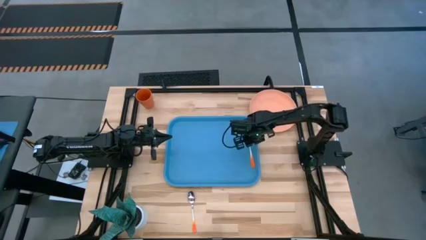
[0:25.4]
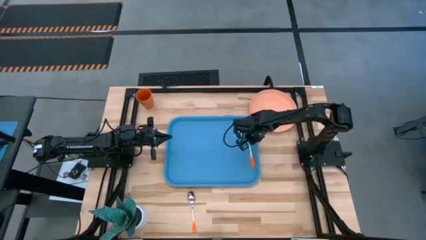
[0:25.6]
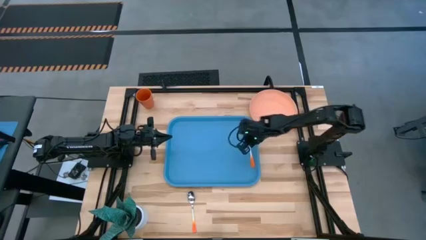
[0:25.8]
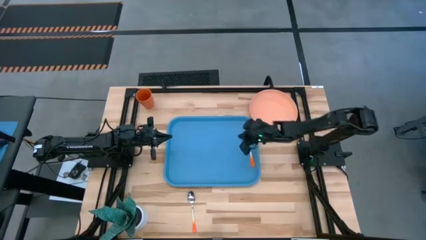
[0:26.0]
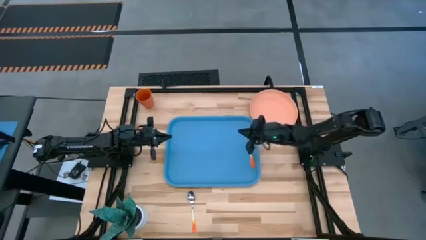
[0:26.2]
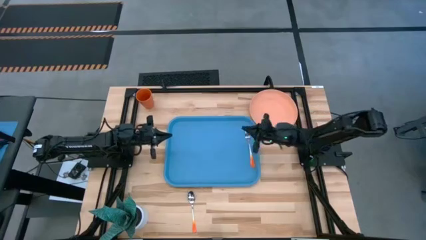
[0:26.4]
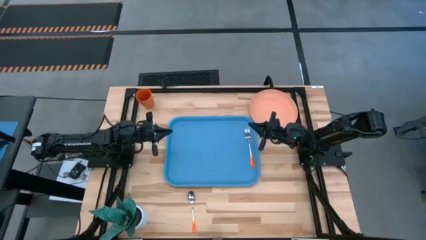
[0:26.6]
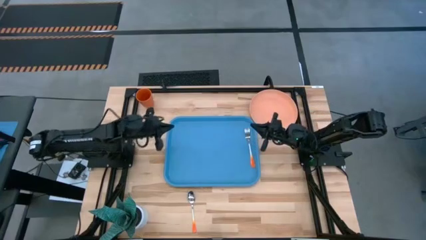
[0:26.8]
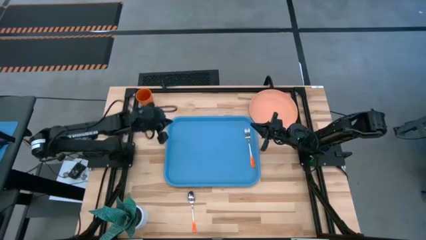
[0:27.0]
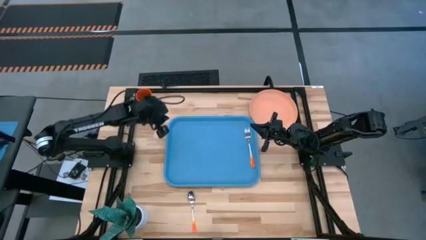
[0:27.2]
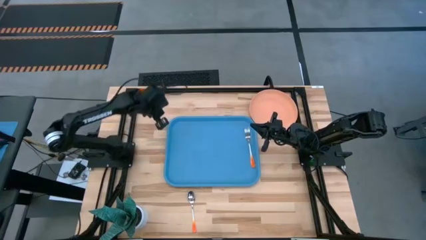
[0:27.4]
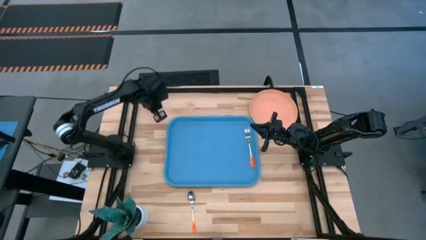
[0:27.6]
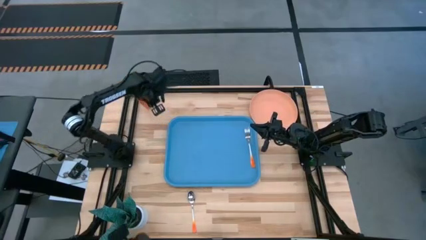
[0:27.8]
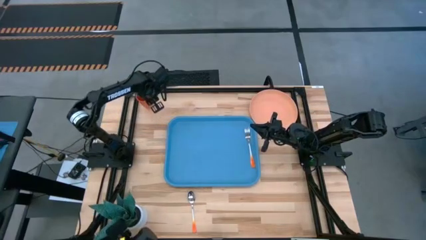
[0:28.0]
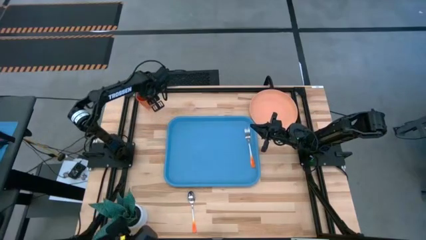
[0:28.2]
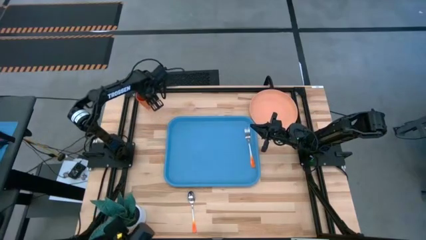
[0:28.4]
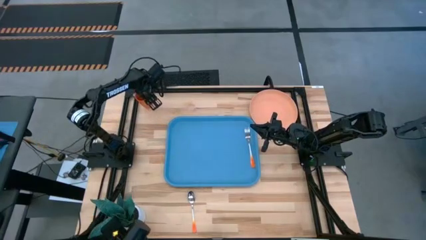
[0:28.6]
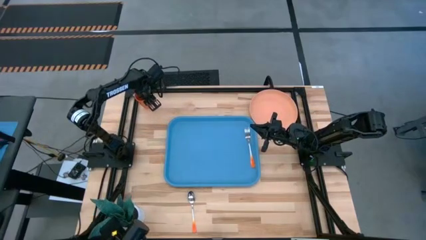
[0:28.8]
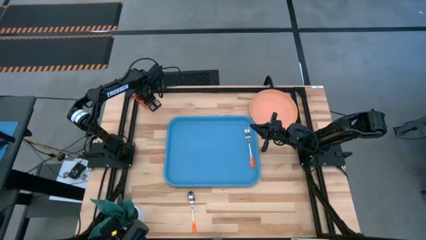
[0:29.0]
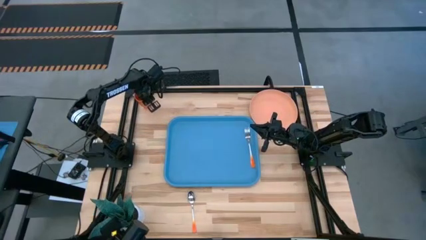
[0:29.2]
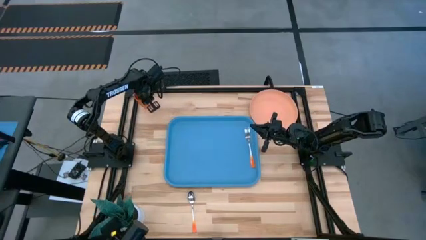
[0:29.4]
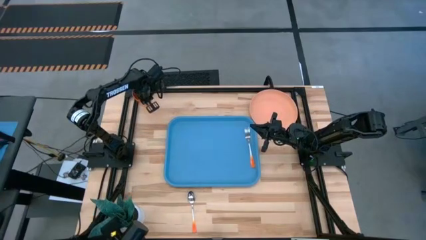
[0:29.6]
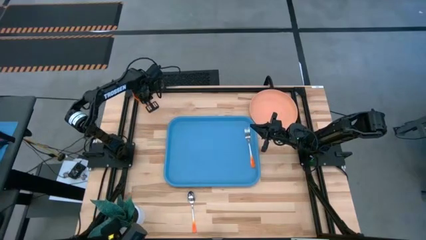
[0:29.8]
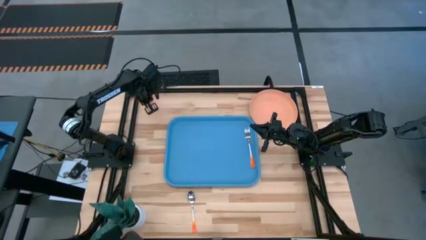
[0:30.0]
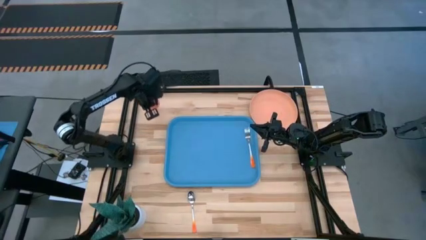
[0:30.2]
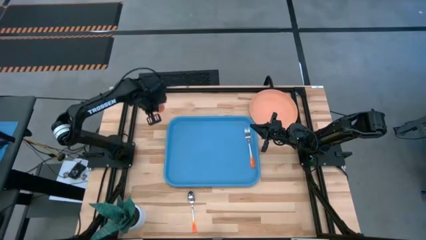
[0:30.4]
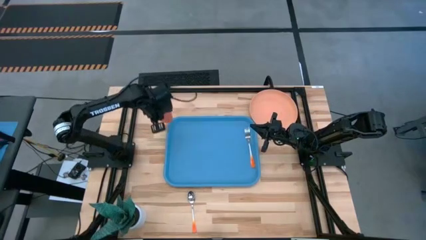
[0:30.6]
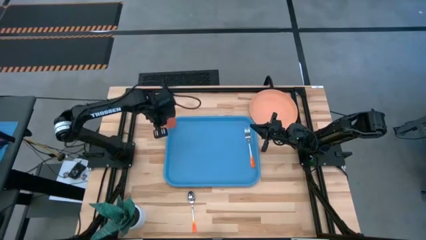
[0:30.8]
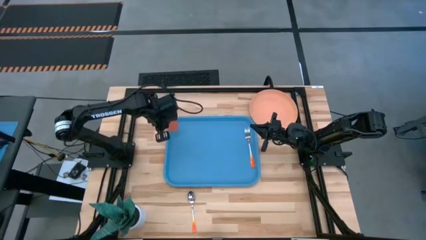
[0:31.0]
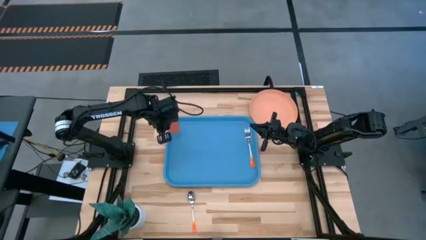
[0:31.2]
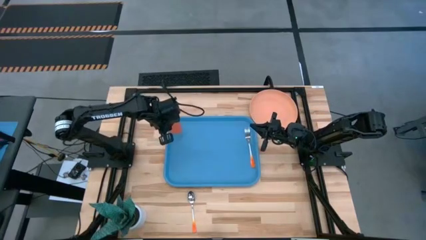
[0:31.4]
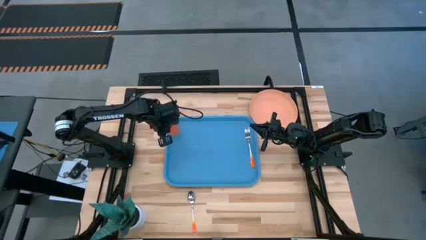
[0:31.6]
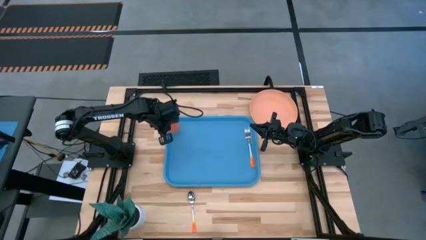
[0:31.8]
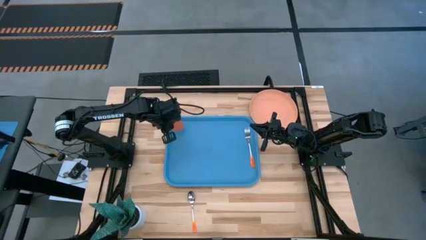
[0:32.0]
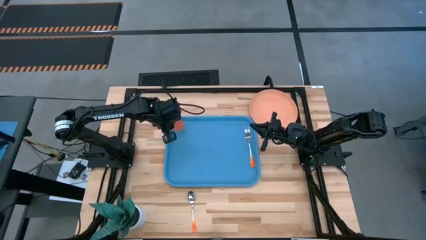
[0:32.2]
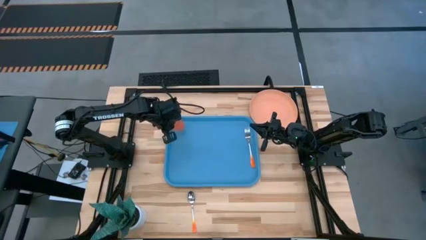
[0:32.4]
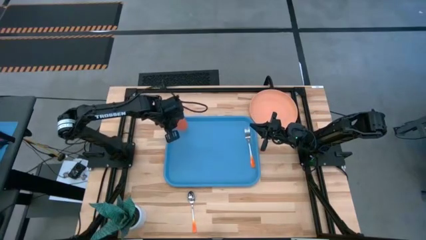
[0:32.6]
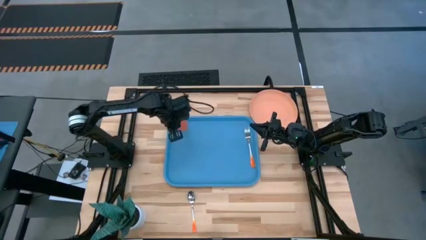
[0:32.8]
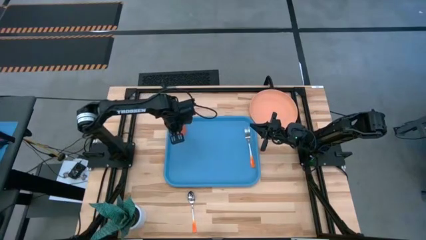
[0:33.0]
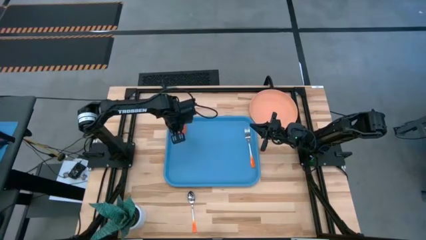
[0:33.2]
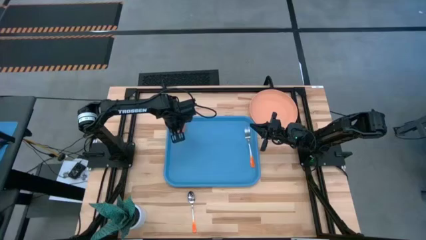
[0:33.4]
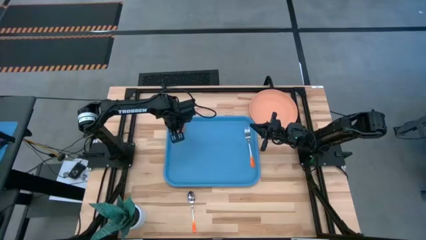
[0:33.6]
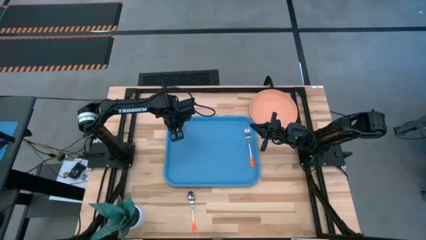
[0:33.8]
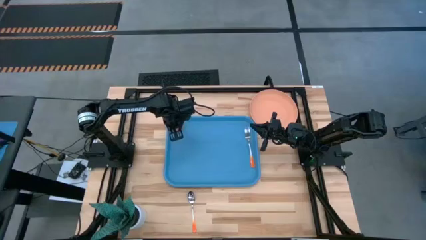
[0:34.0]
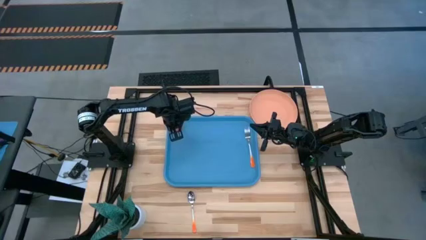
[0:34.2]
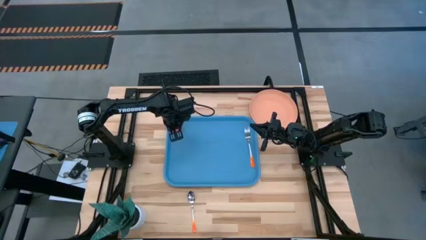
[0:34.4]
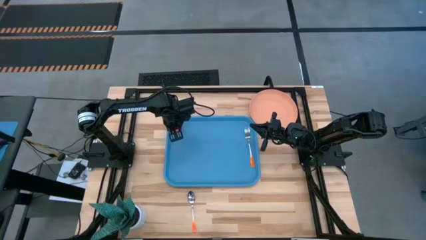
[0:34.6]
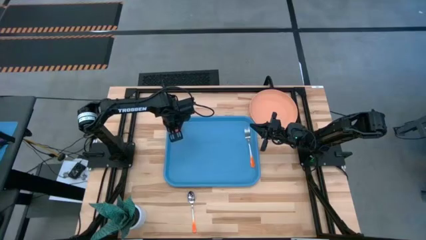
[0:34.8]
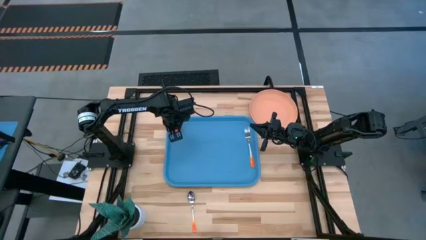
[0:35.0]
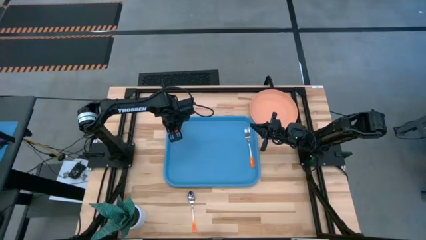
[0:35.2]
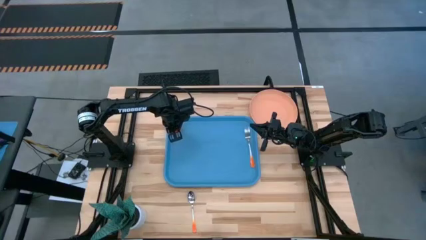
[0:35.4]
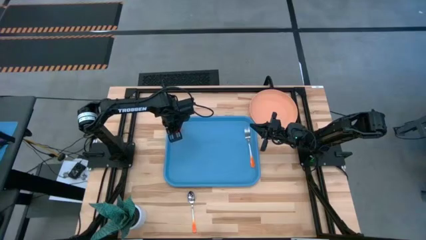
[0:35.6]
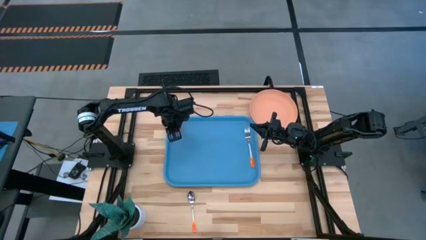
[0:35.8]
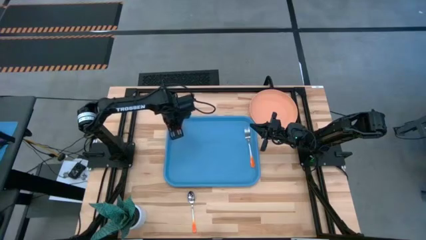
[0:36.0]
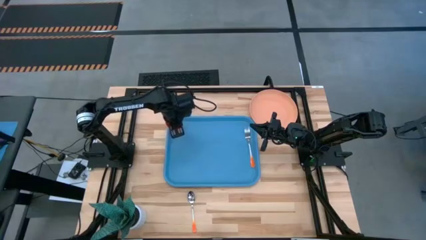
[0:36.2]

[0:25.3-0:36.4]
Task: Pick and place plate/cup/fork/spoon on tray
Put the orange cup on the blue serving tray

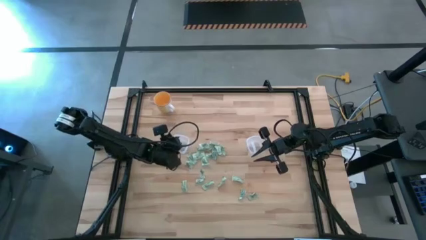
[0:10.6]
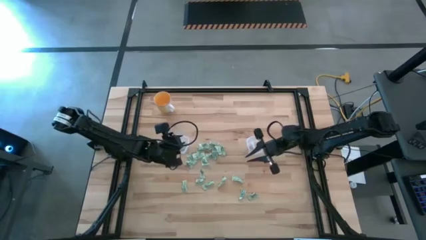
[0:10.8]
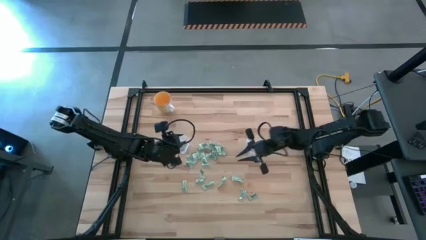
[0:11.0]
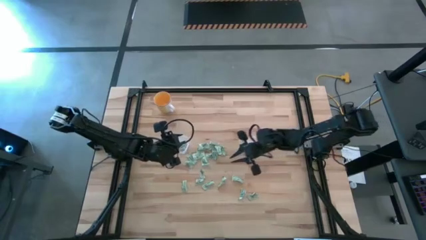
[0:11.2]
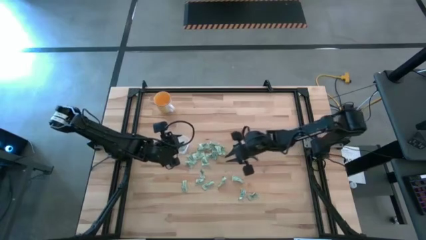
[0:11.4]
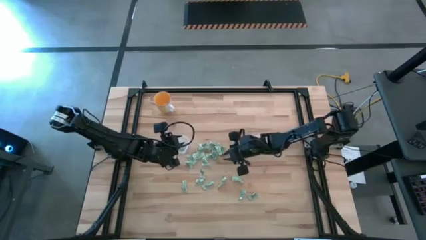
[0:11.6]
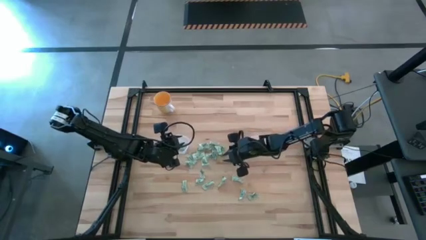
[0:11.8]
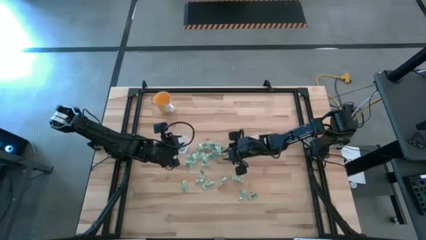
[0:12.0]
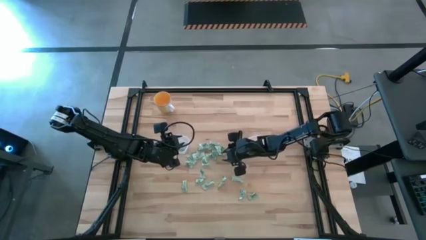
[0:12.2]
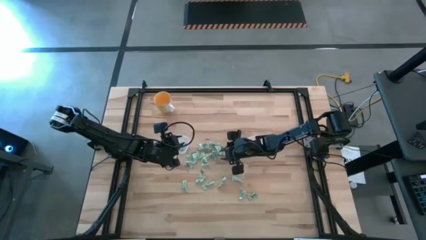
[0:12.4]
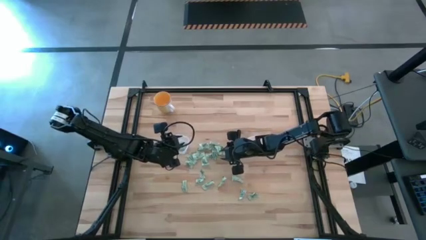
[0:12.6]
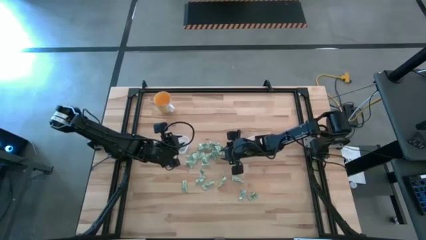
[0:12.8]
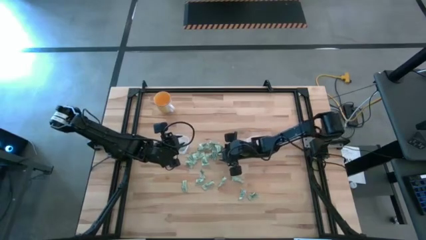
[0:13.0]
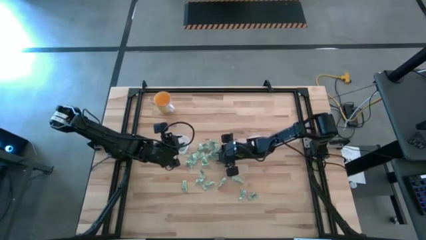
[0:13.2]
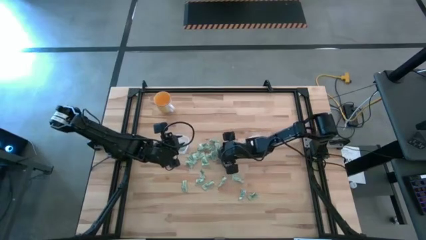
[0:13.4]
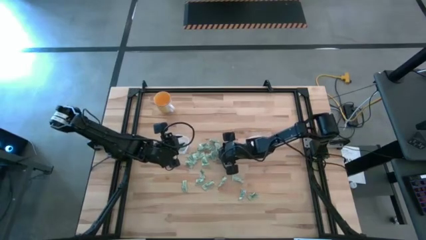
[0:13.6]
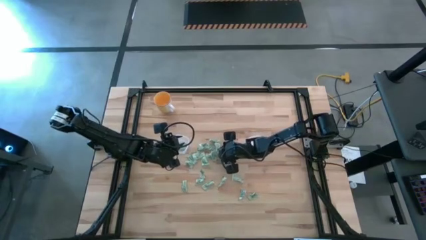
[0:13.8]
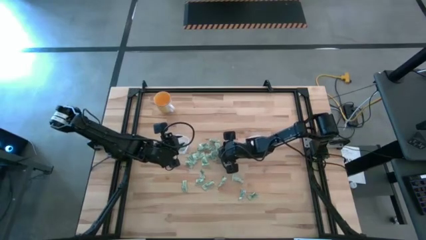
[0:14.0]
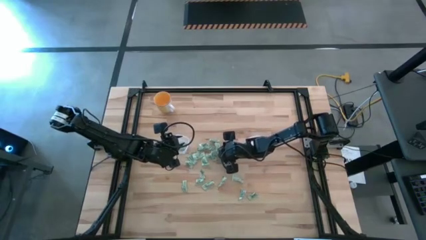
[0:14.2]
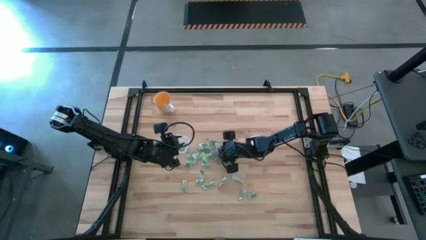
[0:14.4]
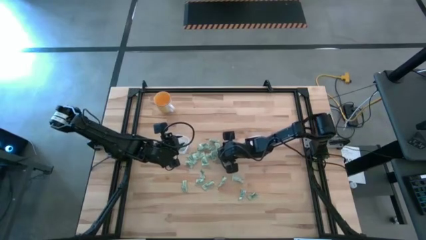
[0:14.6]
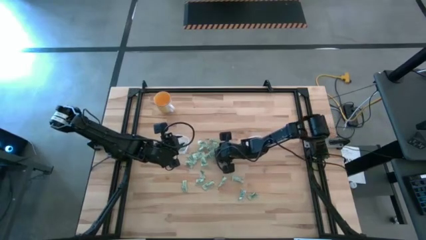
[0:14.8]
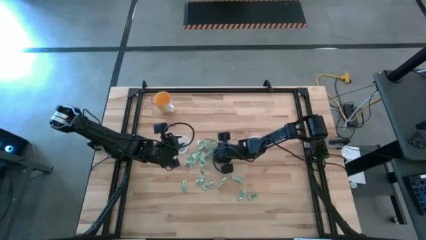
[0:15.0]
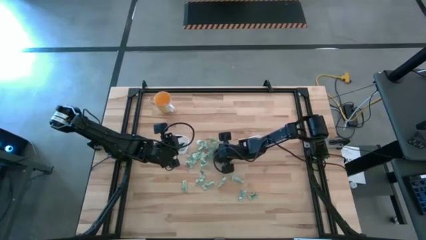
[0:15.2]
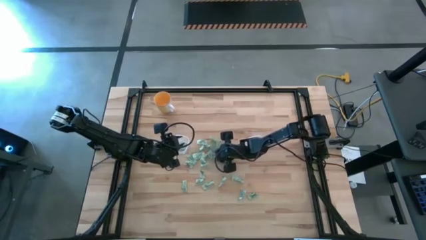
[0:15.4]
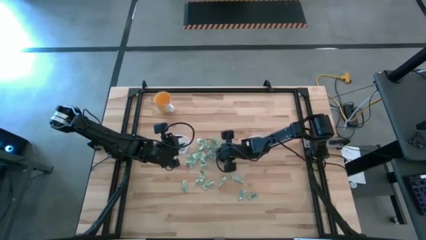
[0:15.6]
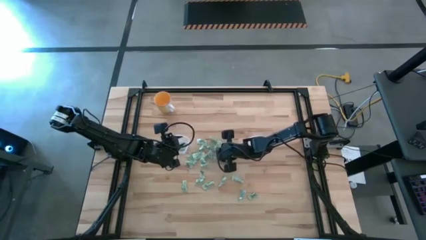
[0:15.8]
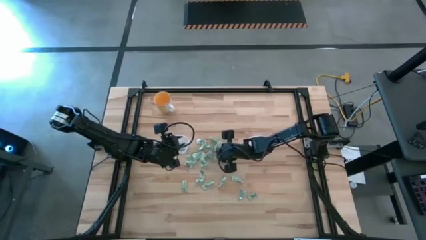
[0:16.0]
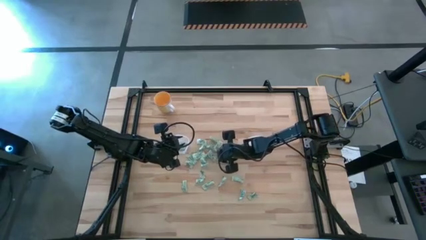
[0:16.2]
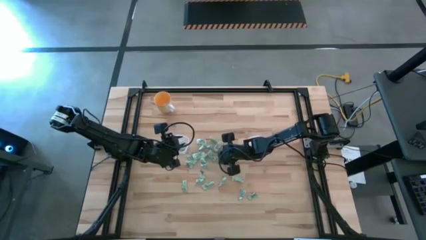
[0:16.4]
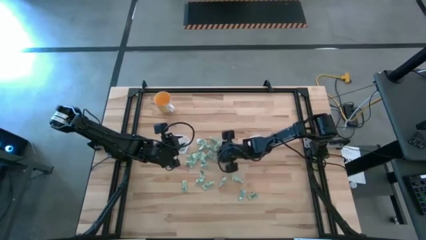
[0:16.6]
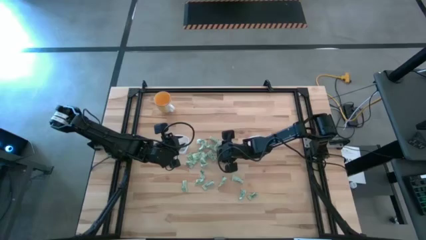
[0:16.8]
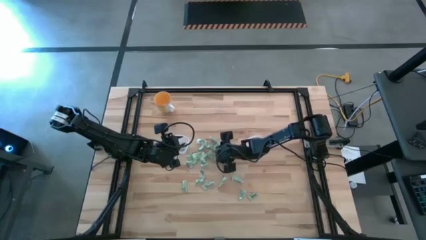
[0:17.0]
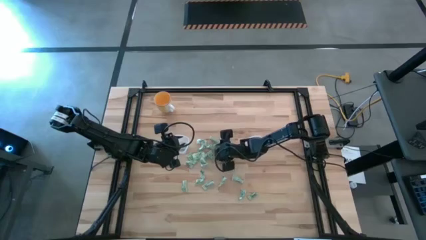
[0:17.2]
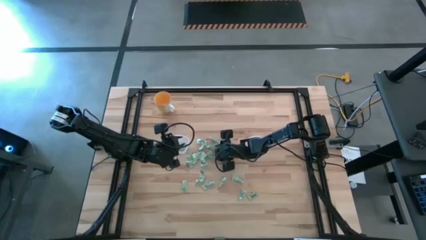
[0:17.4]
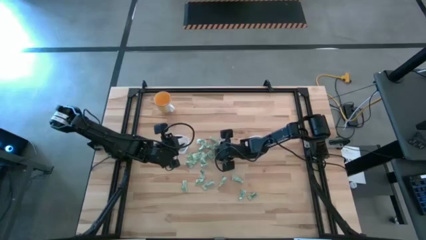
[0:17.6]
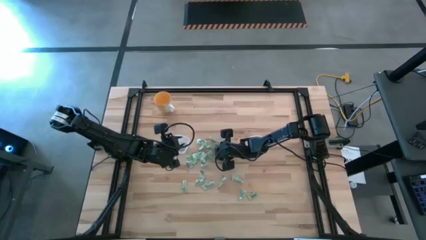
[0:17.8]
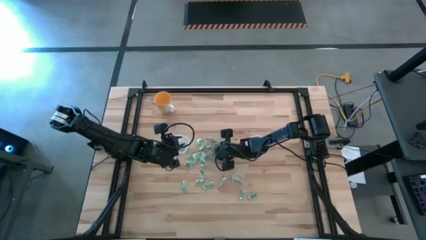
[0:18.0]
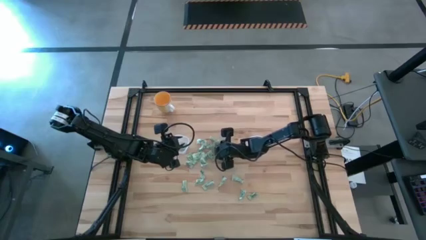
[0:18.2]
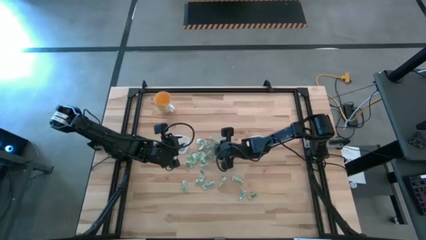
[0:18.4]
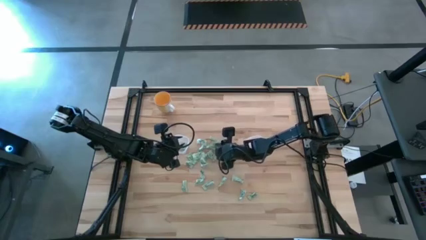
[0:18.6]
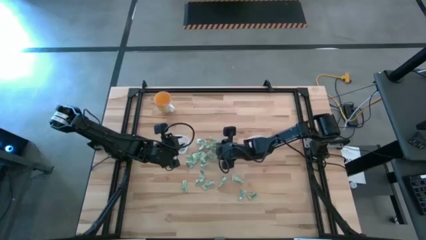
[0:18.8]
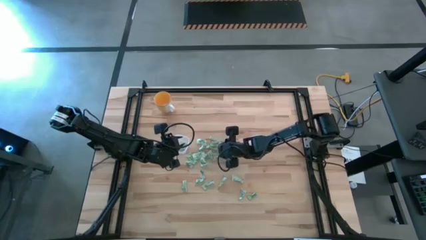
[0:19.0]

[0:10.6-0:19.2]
Task: Pick and place Stevia / Truvia into bins
Put the stevia packet into the right transparent container
